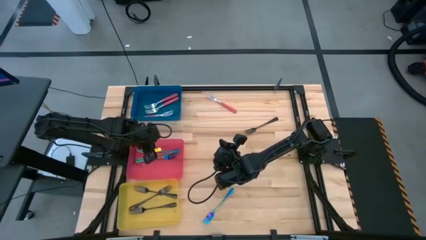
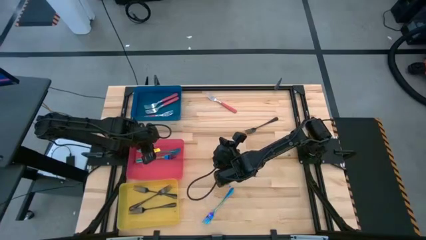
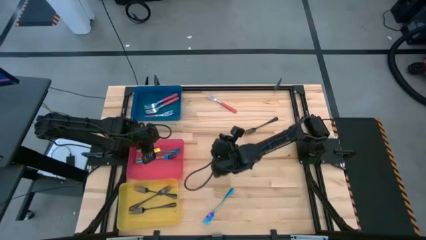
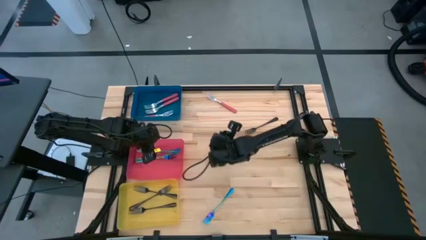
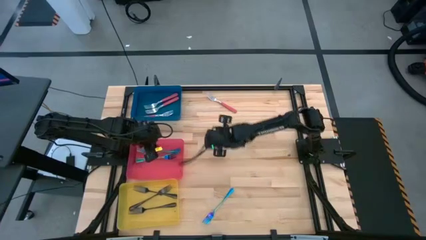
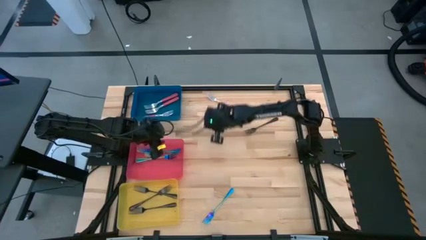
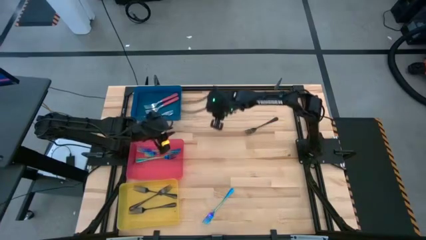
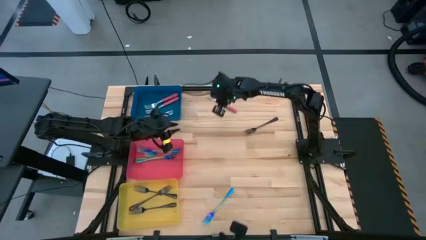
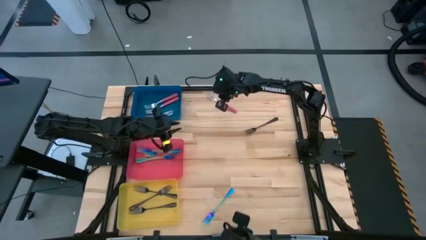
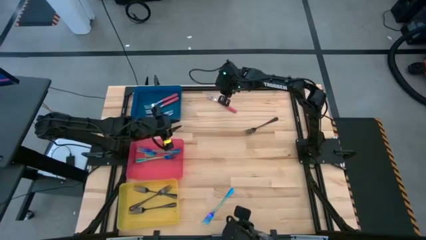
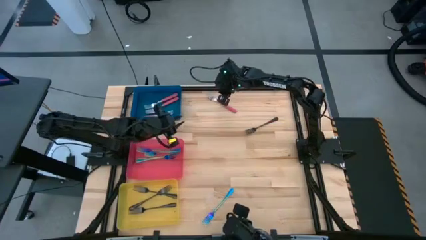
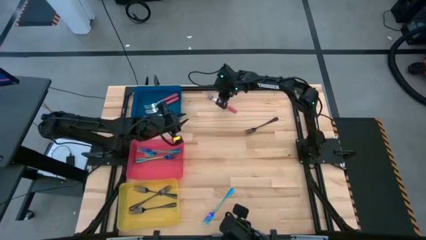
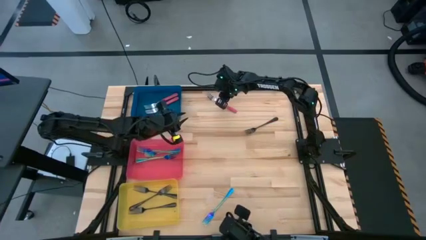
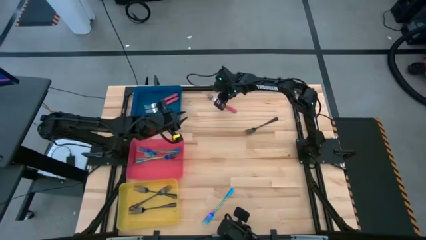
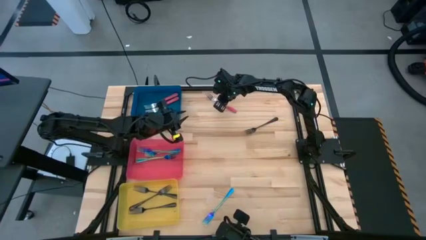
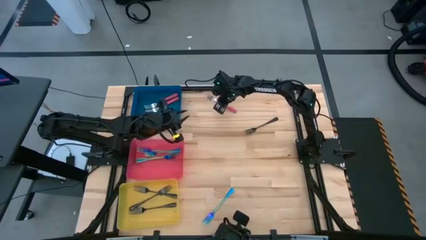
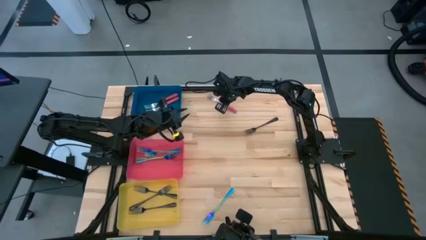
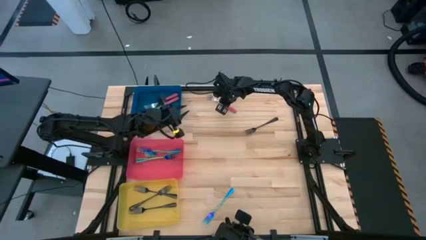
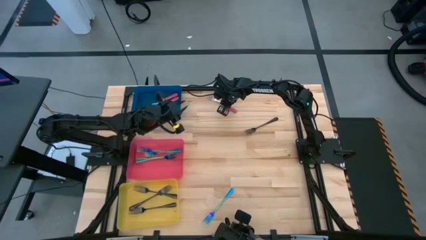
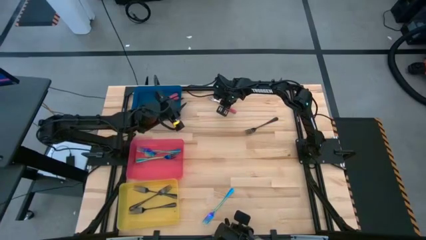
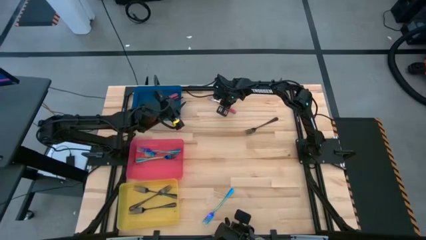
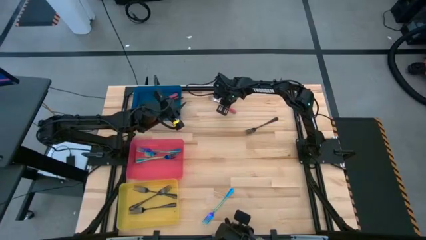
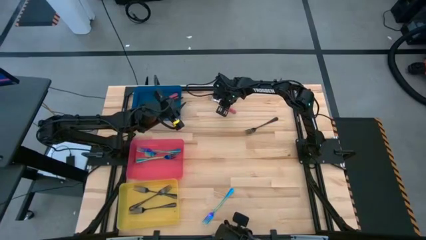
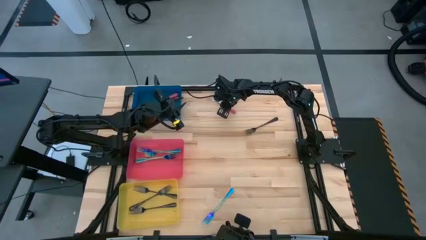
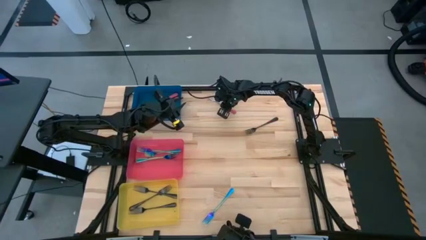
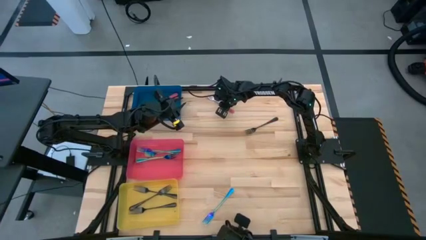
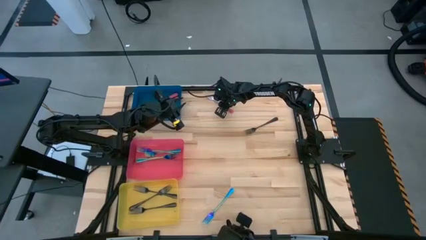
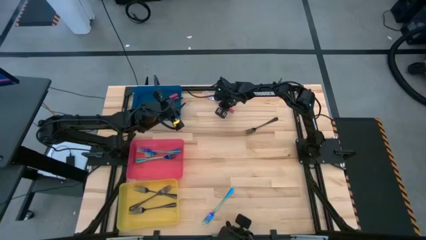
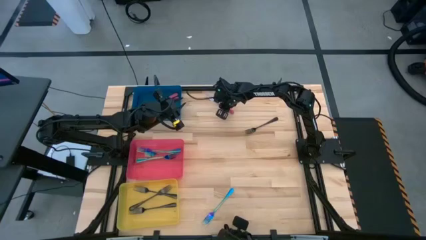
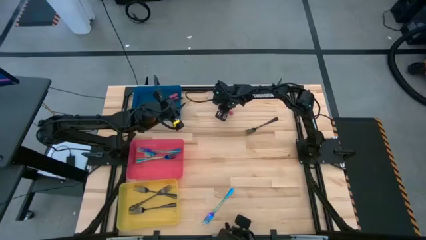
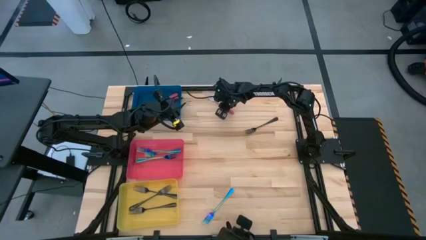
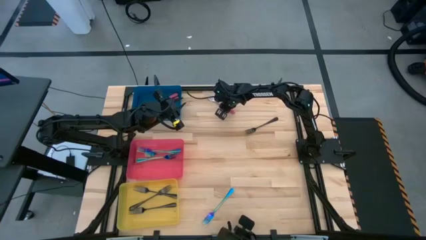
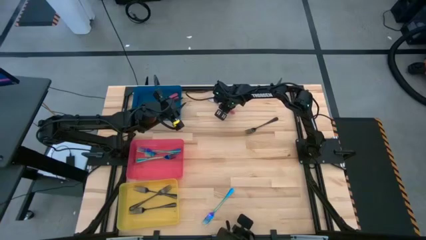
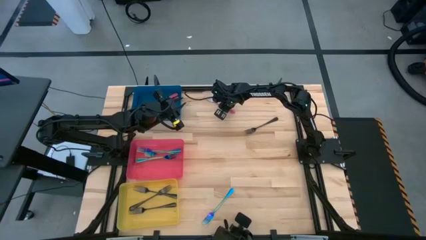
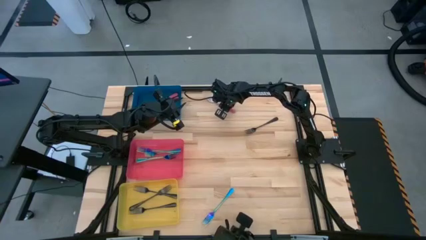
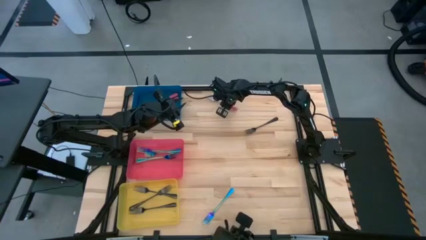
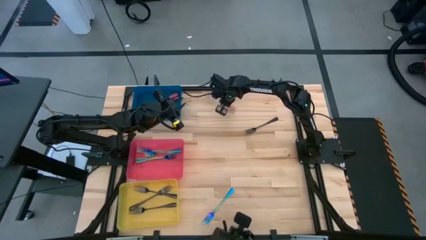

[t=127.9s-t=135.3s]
Task: Sort silverware by color (type)
Put the pink fork into the blue bin

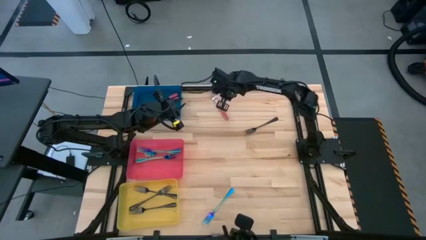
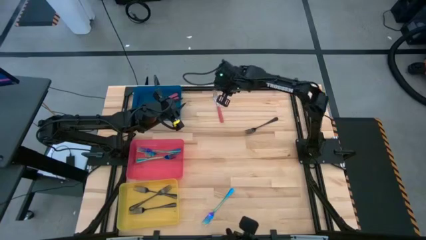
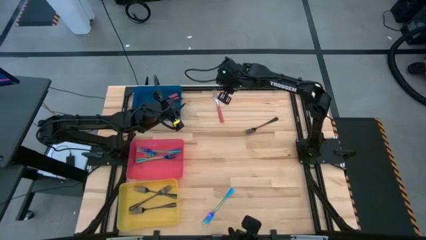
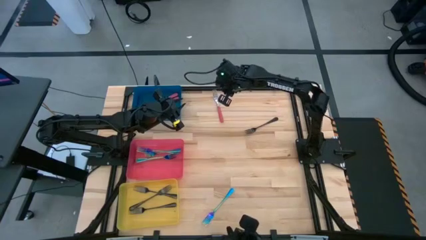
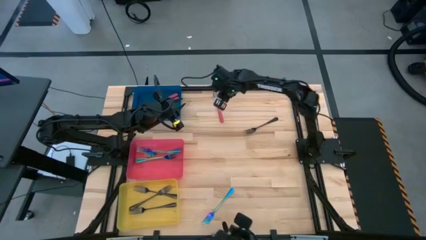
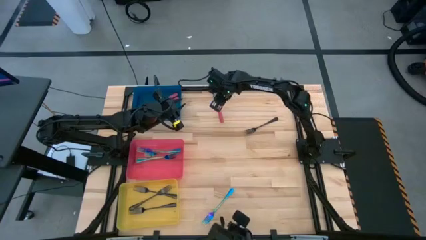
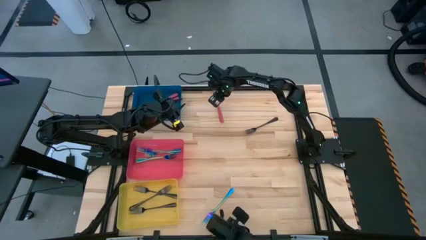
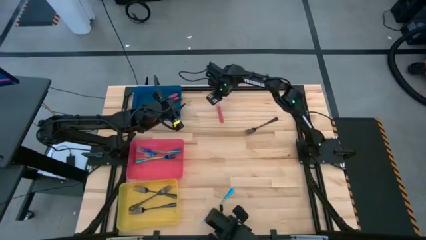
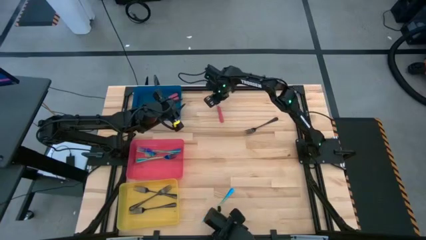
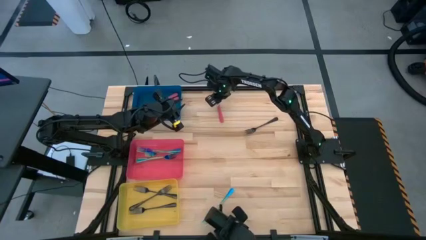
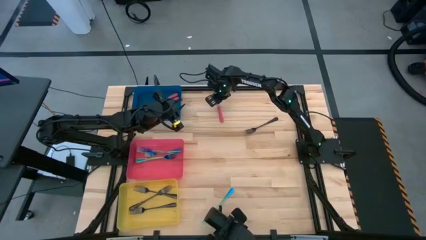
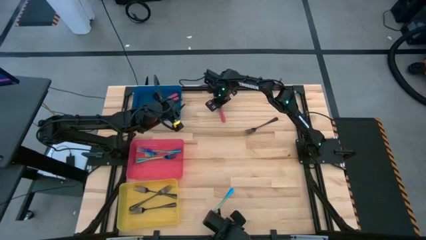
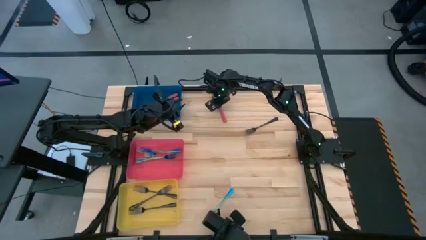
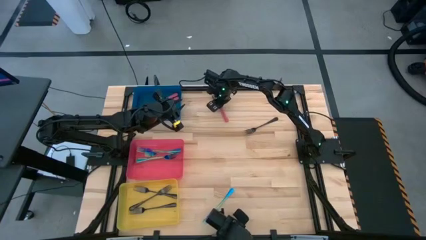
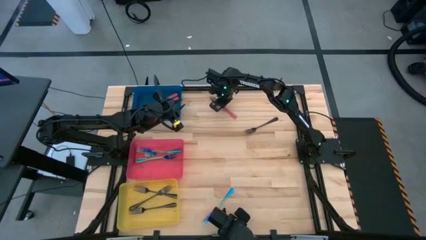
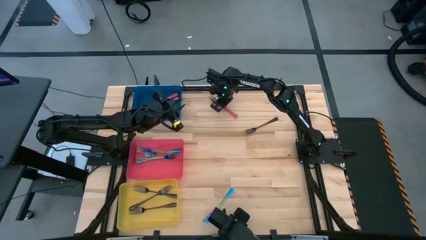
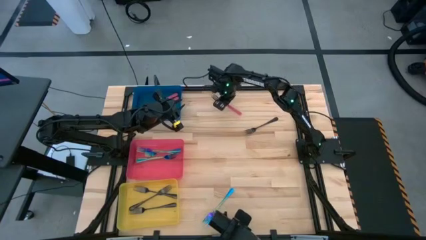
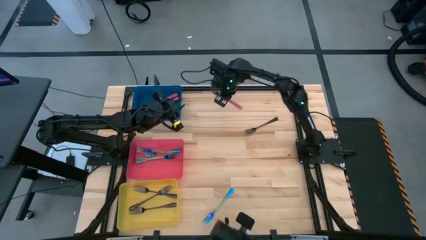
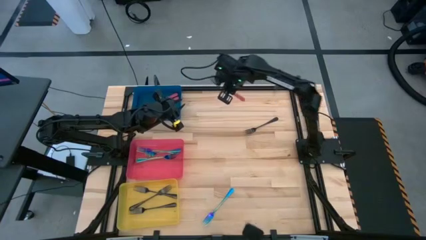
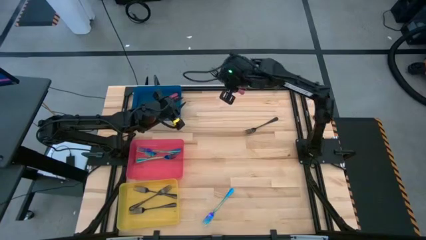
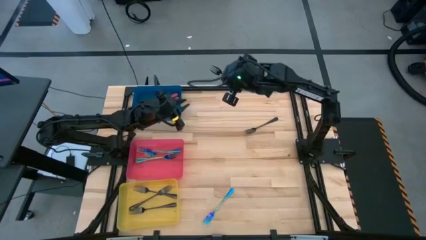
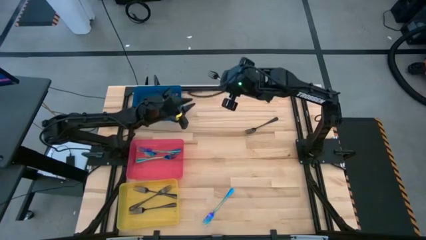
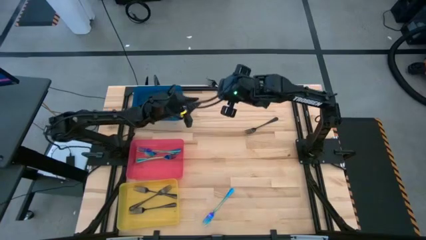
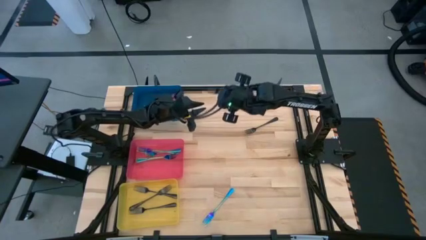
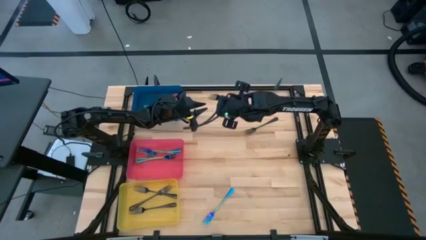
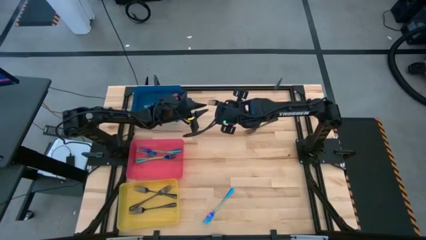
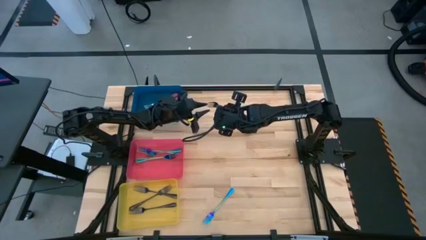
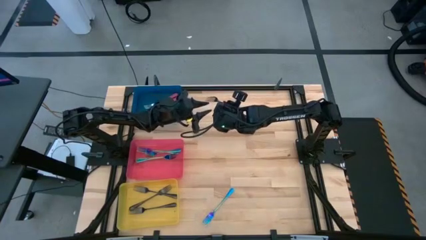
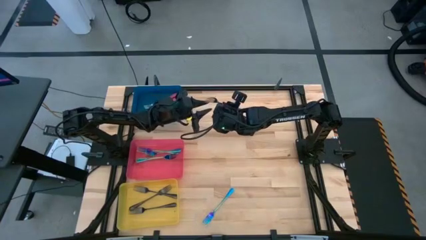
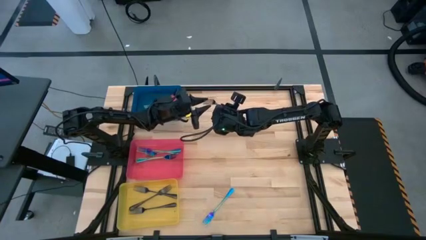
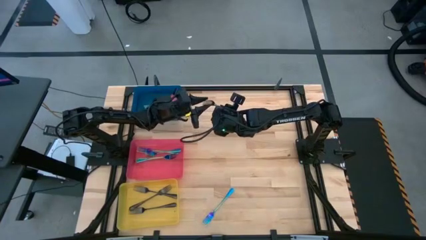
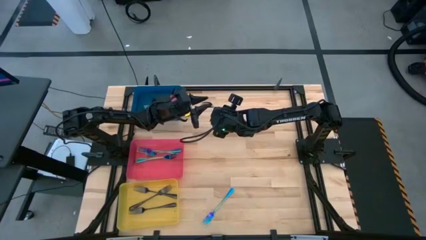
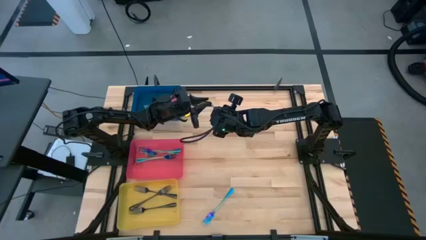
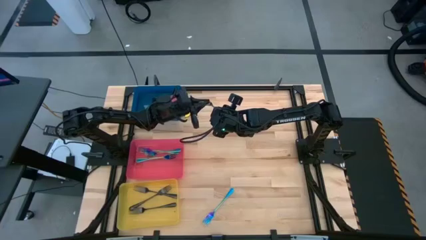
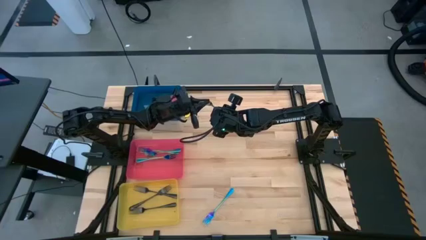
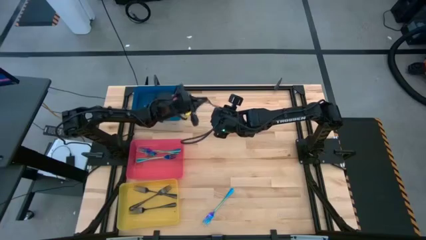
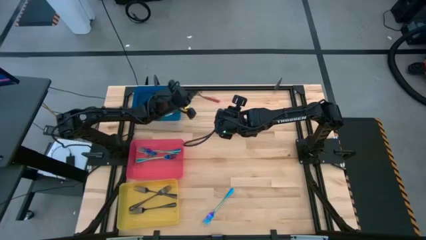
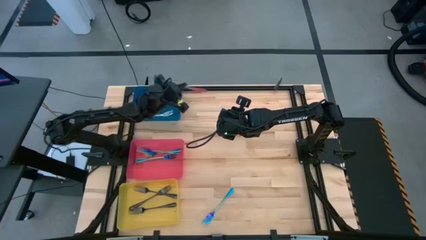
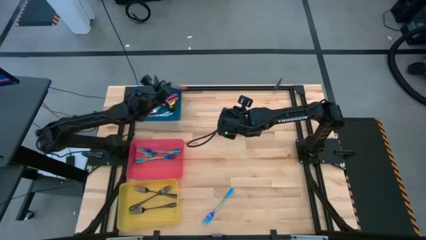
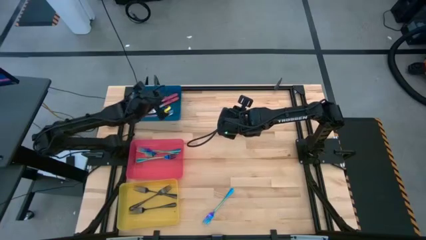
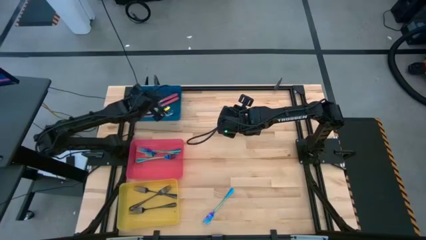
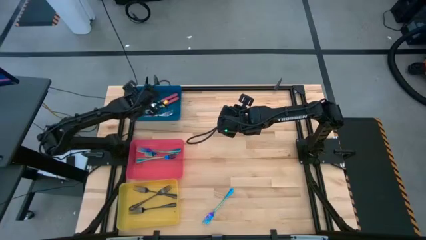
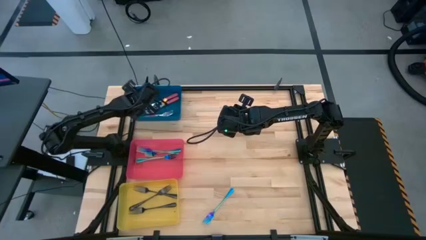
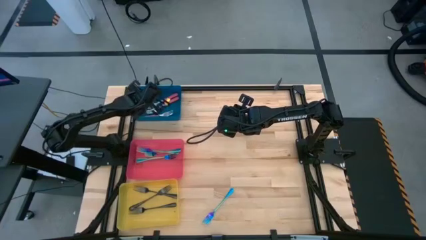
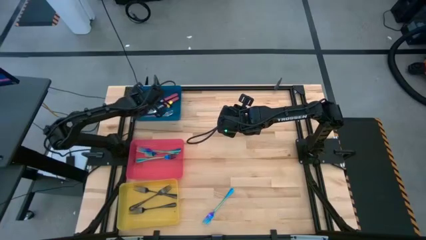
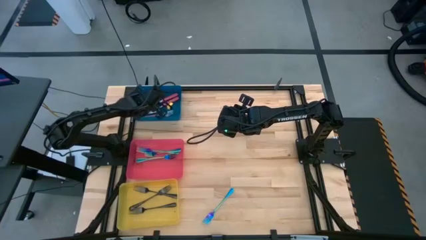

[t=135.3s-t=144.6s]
Put the pink fork into the blue bin

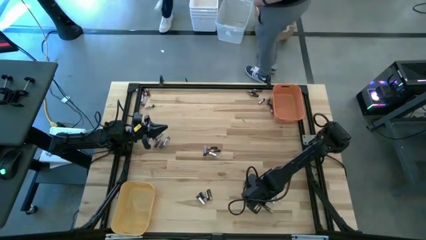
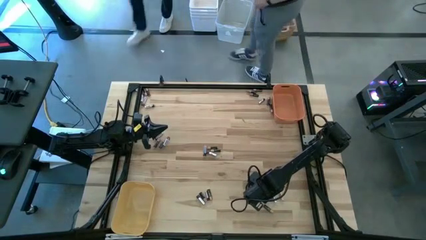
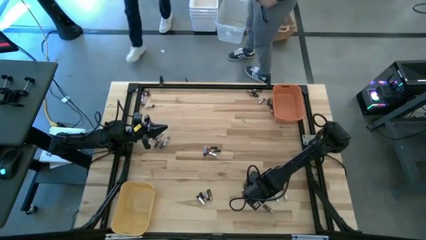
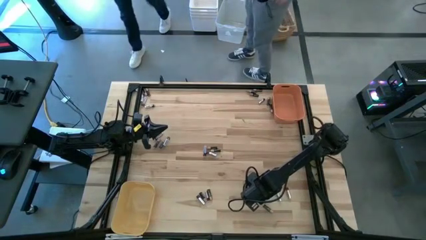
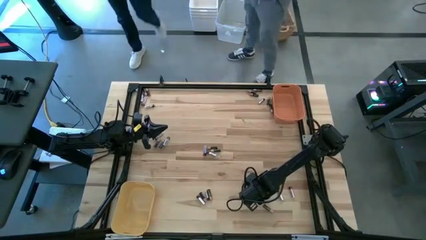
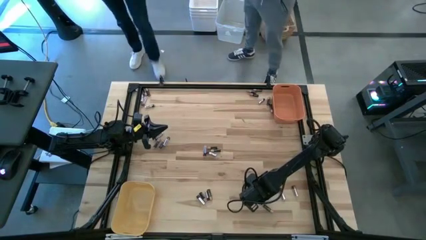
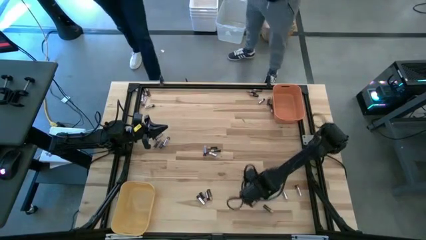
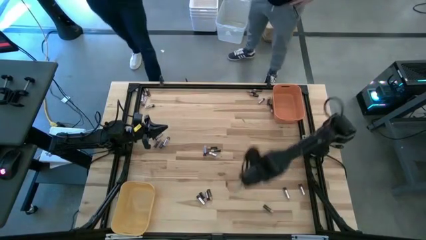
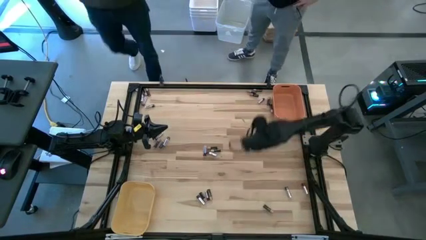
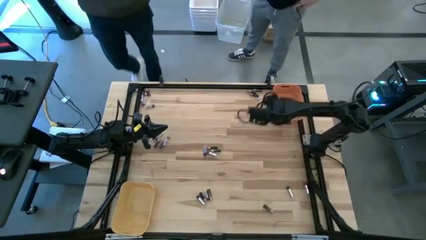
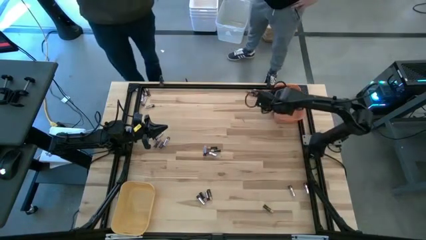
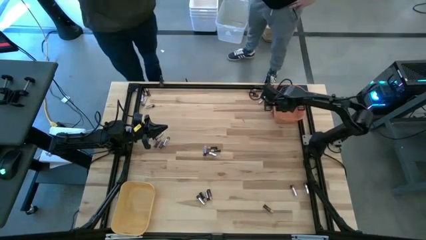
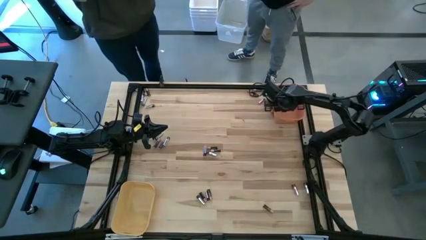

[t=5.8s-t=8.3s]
Task: Sort batteries
Put the black battery into the orange bin
